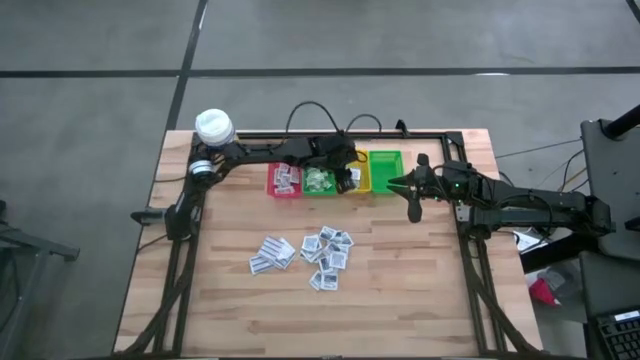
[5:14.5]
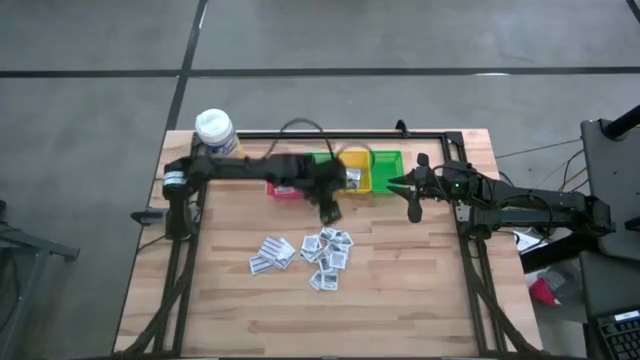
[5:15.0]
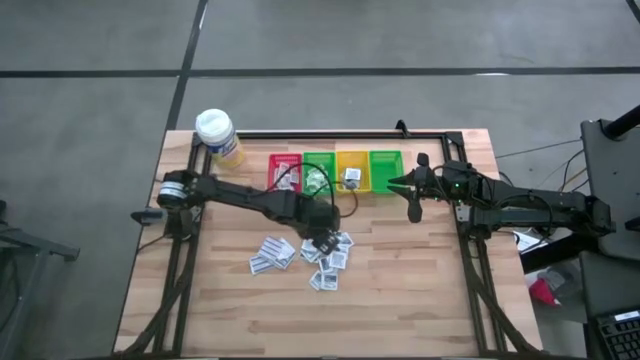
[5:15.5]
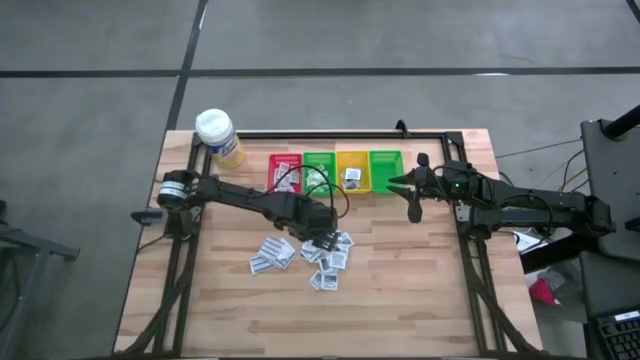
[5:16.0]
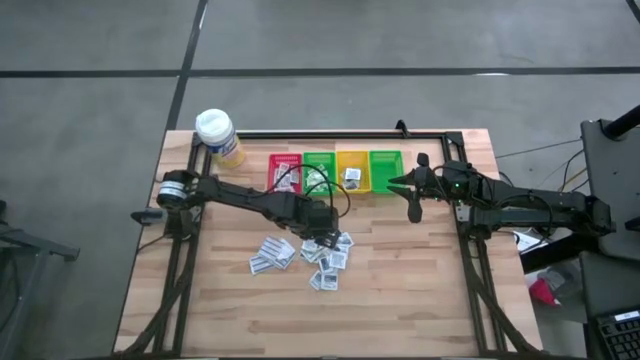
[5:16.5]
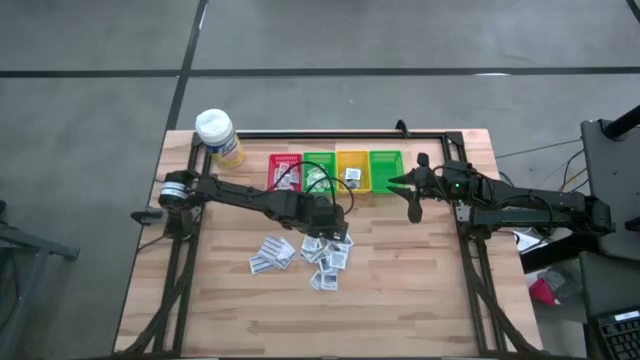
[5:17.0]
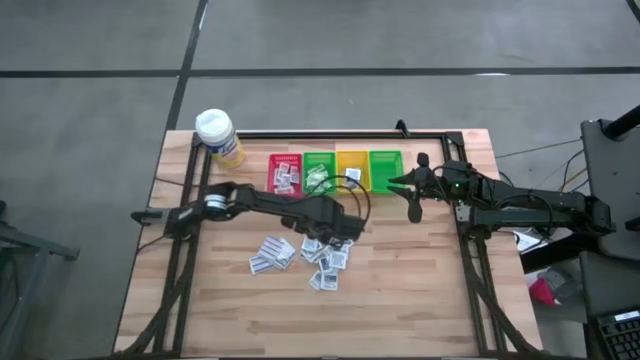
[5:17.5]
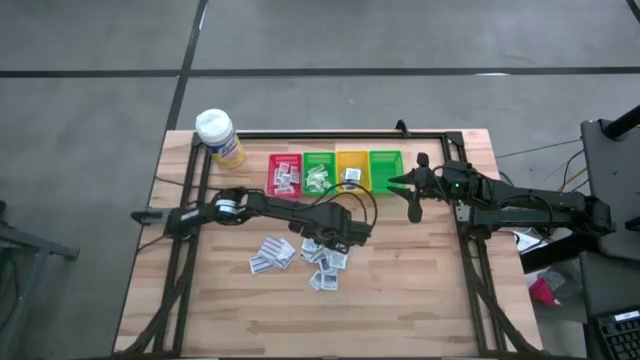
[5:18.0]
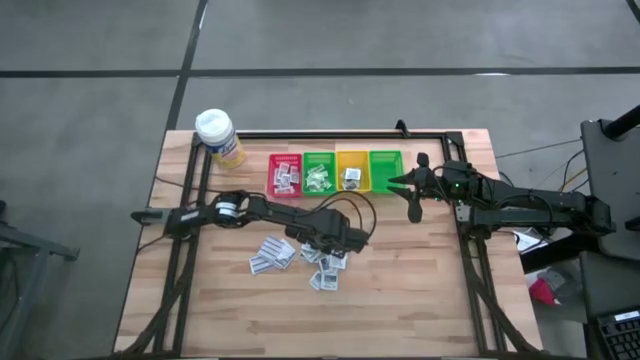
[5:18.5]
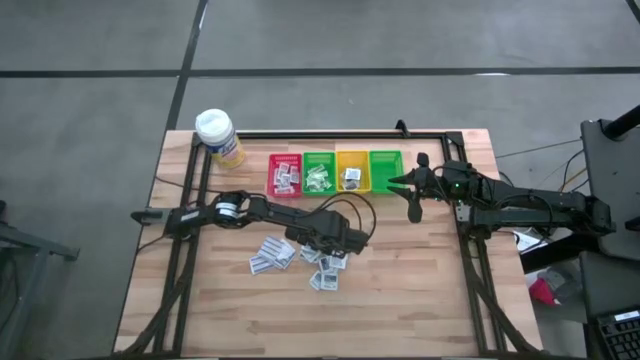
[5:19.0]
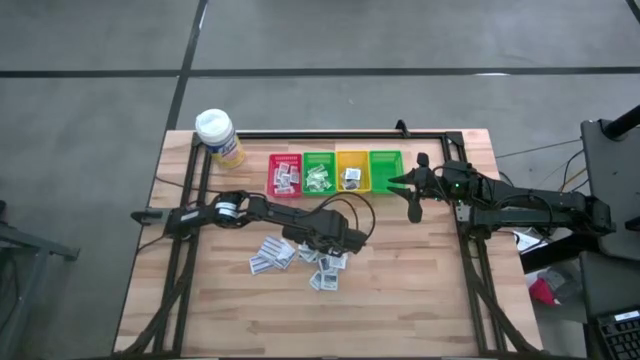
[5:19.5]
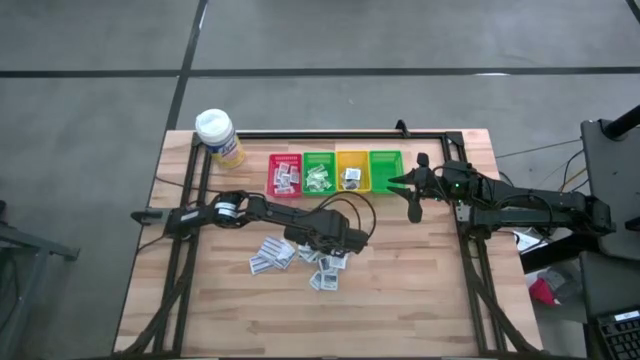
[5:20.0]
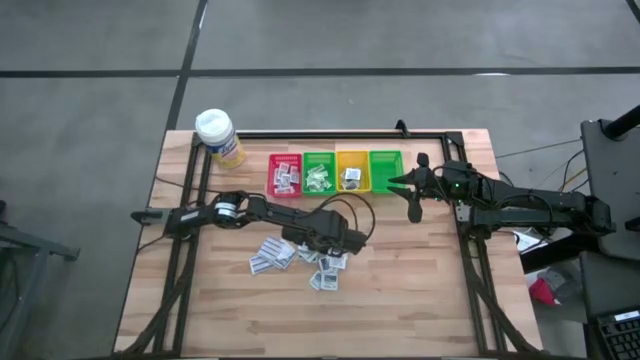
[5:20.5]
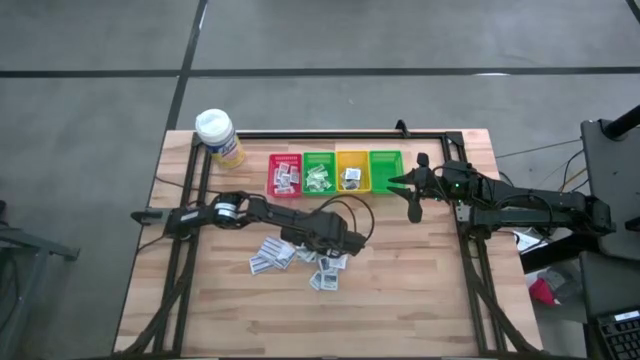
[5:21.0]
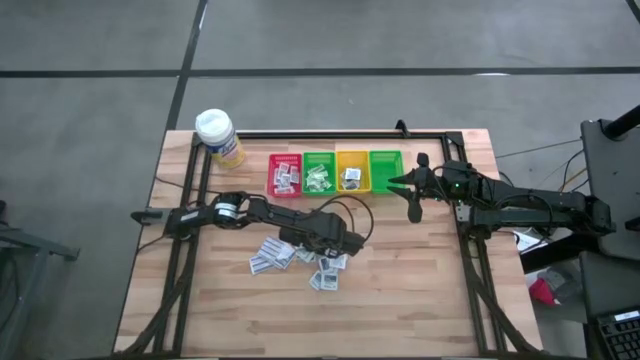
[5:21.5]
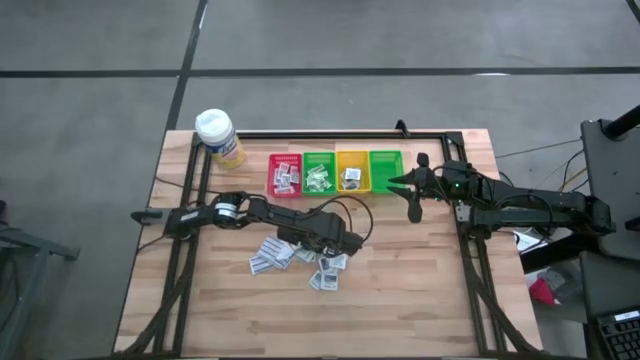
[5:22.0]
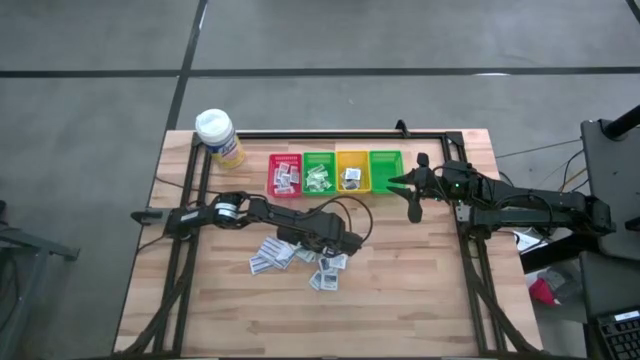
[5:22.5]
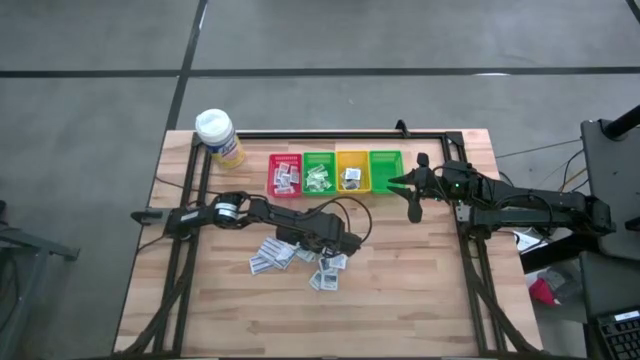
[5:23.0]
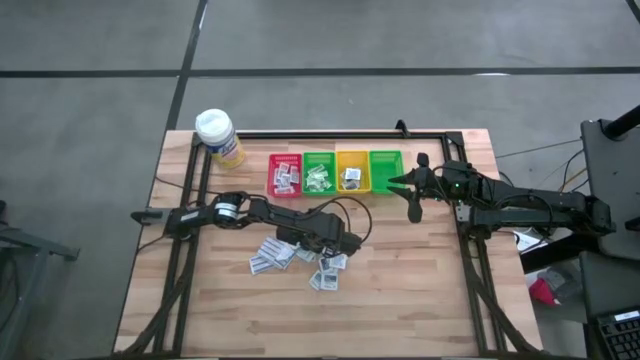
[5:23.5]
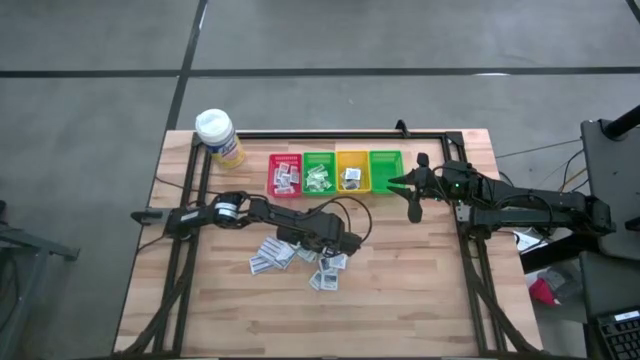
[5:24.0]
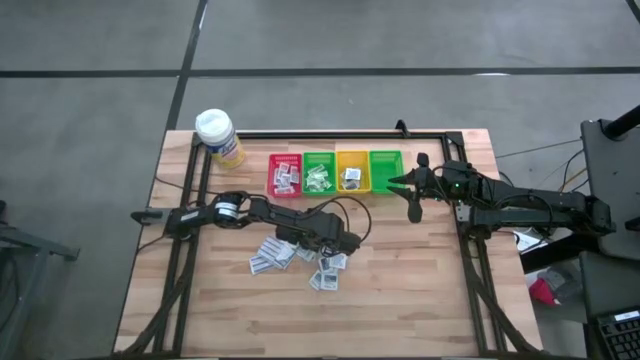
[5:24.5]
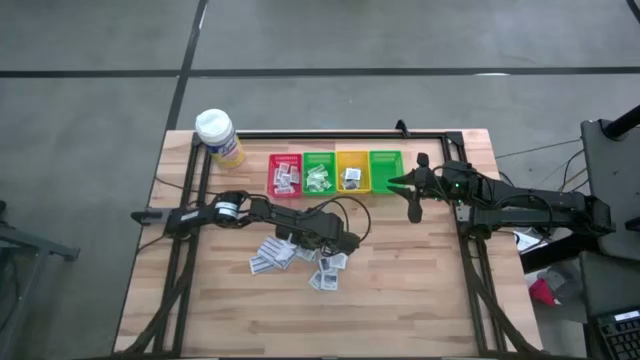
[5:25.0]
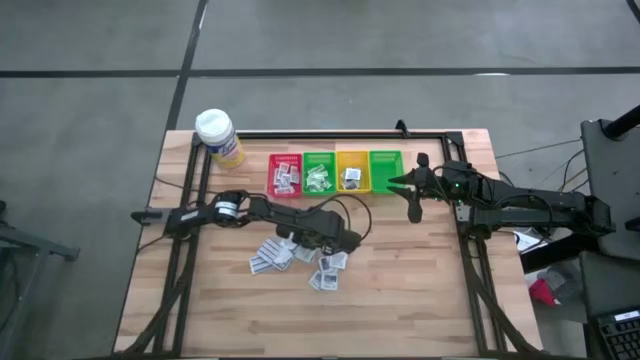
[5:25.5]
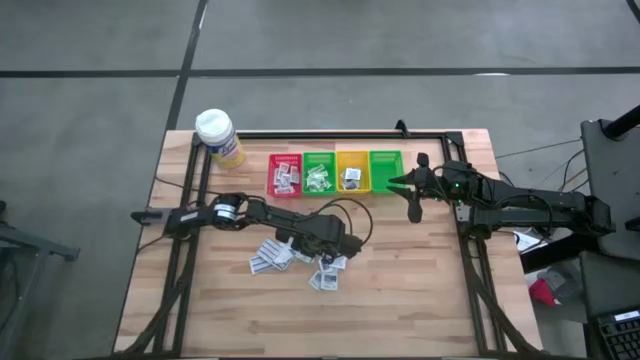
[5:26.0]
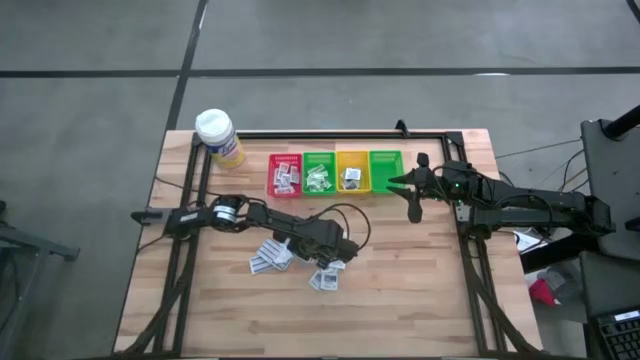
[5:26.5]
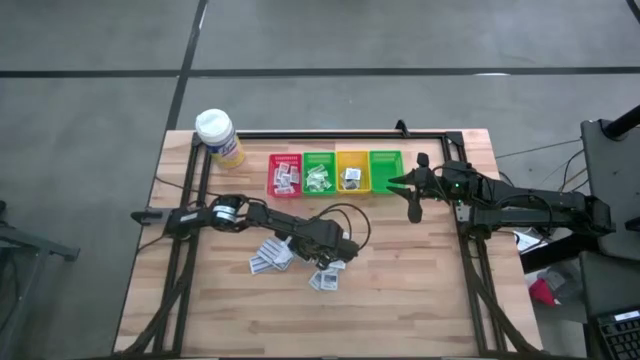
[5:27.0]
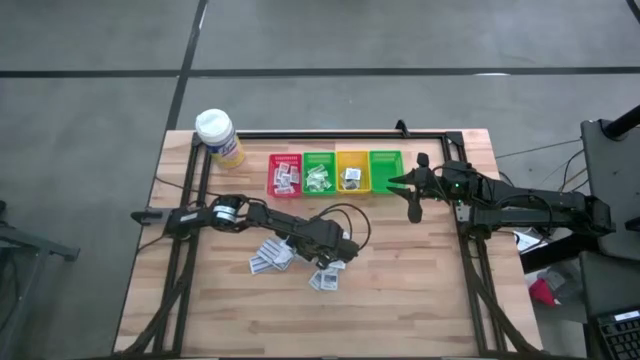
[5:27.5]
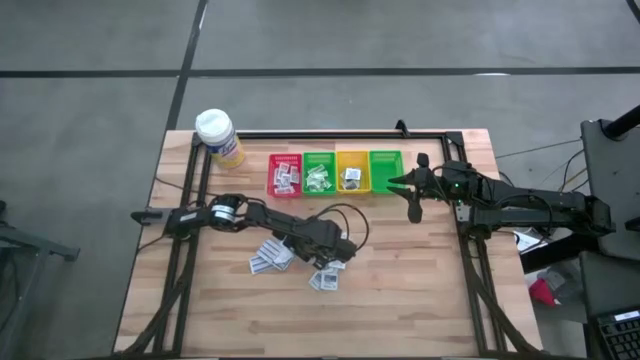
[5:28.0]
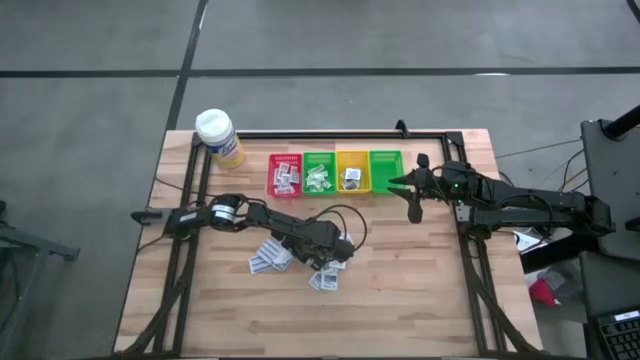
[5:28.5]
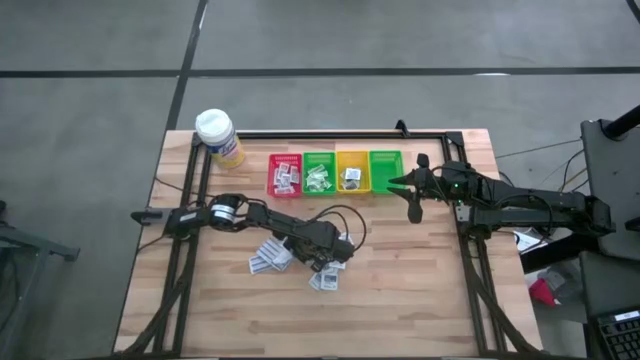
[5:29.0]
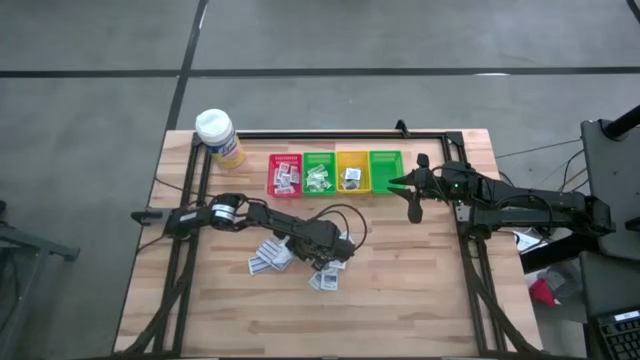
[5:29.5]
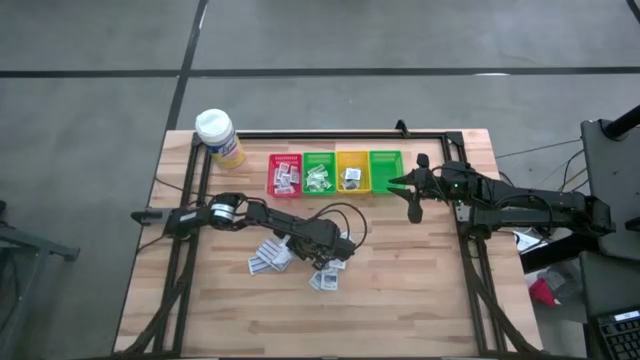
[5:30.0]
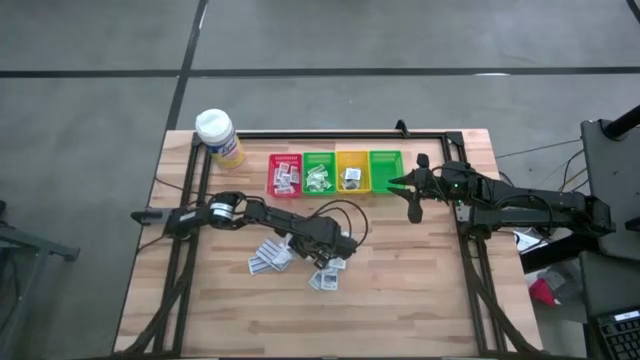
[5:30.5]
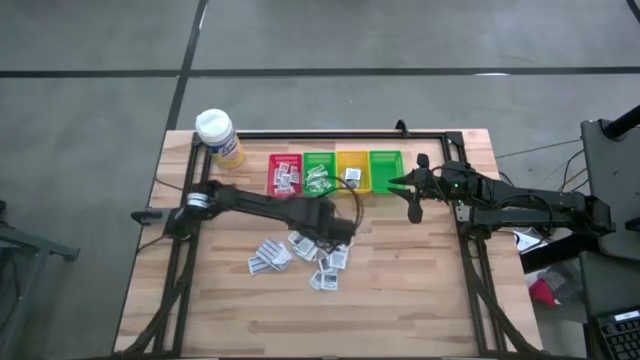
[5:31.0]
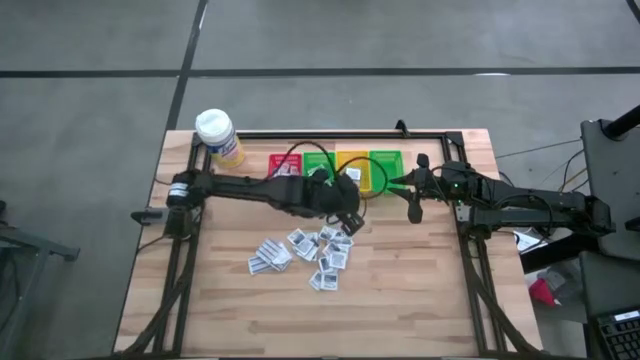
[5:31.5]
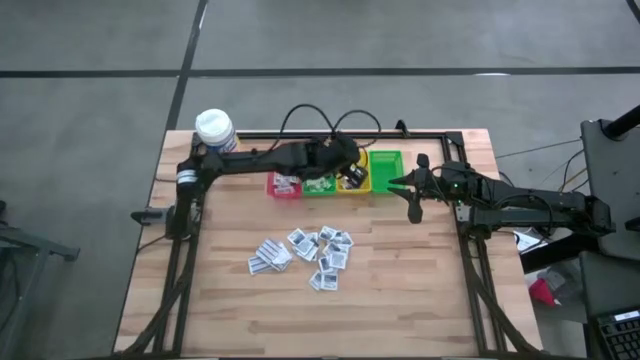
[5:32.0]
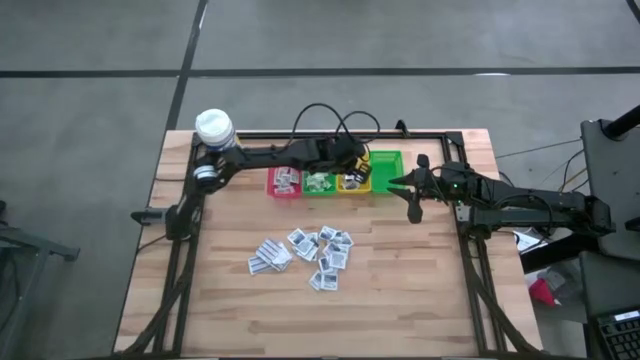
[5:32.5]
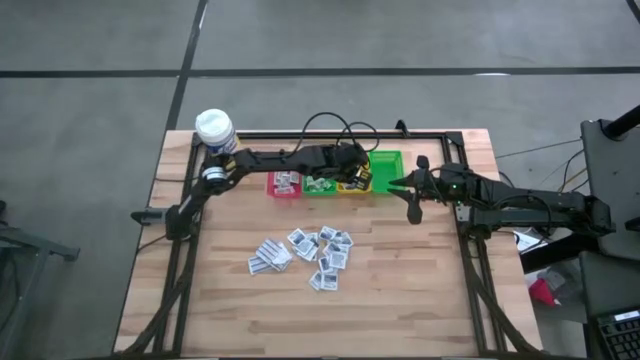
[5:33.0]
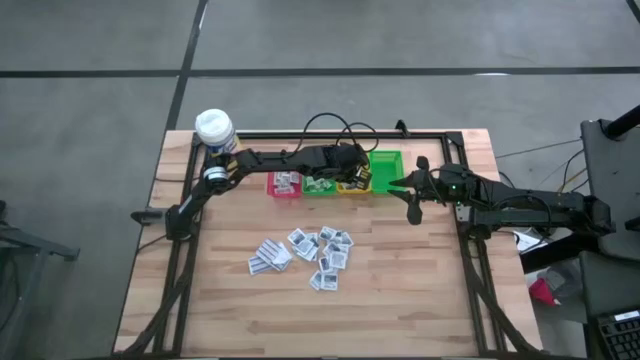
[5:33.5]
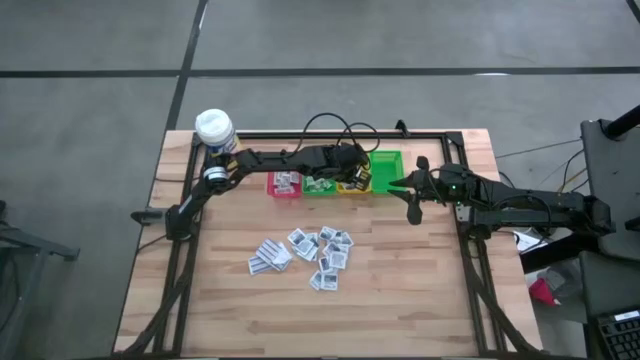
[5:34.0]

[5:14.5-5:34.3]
Task: Pick & Place First Aid Supplies
Put the alcohol pad into the yellow bin

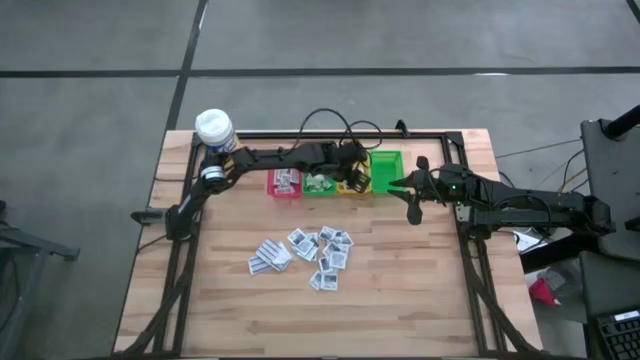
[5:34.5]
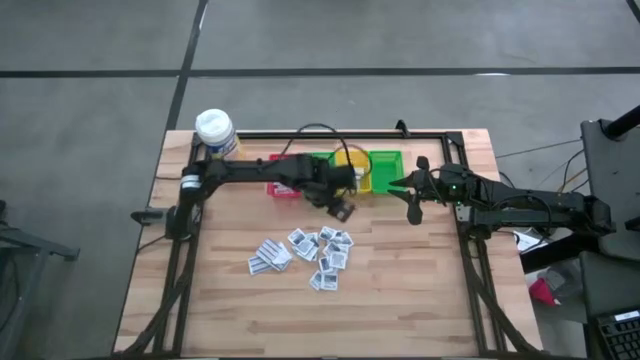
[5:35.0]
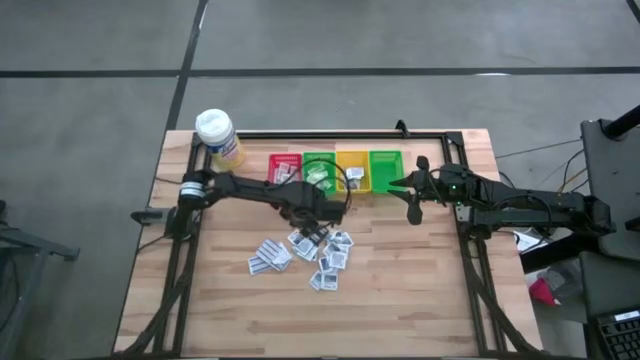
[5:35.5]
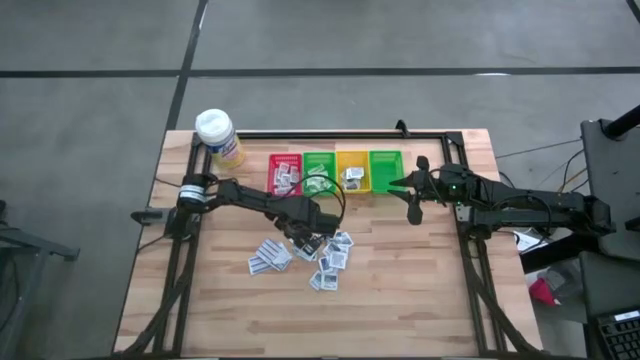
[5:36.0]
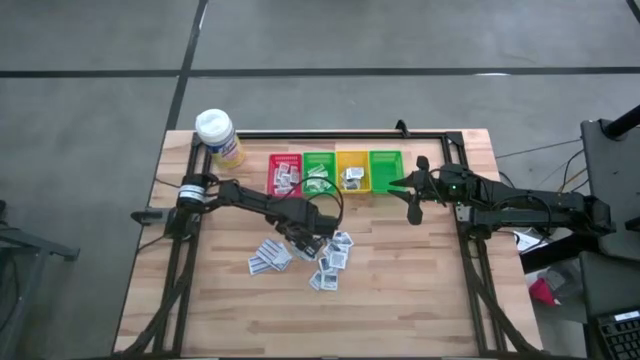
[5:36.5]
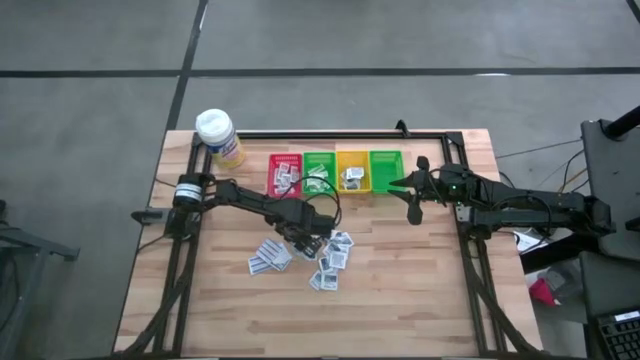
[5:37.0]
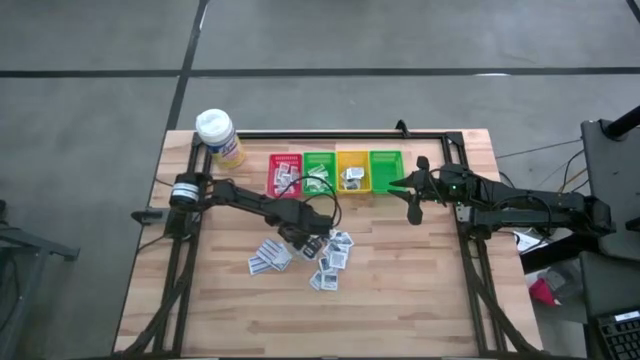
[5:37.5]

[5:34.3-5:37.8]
Put the alcohol pad into the yellow bin
